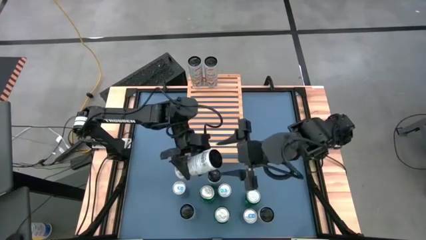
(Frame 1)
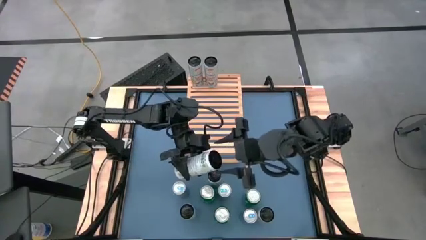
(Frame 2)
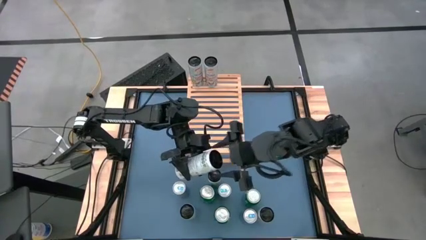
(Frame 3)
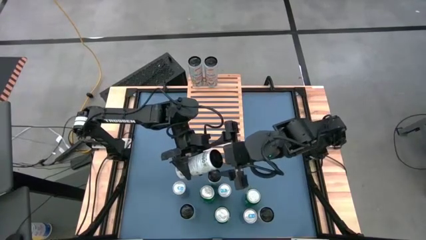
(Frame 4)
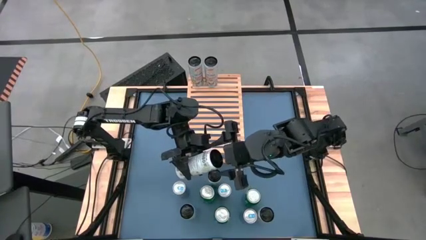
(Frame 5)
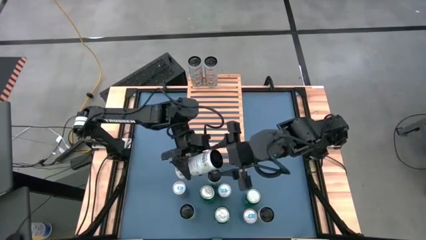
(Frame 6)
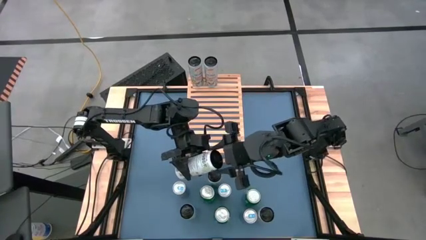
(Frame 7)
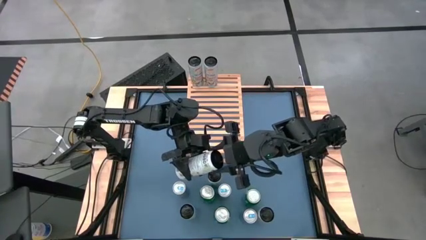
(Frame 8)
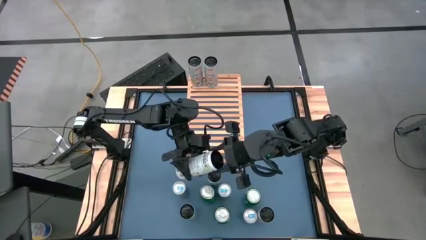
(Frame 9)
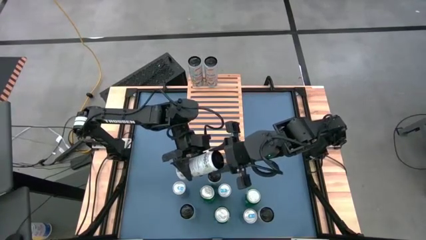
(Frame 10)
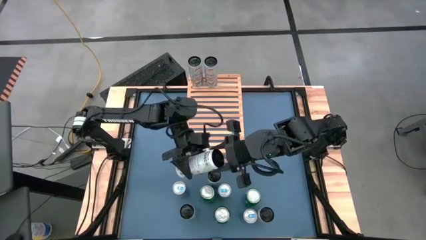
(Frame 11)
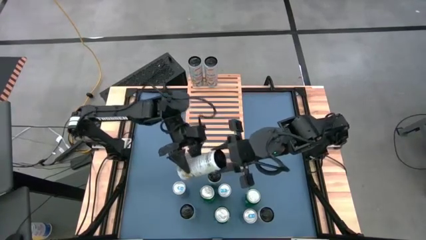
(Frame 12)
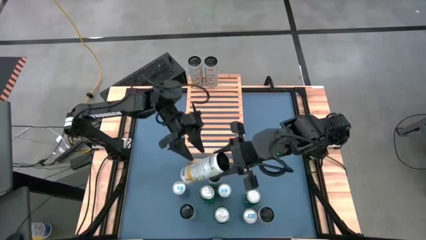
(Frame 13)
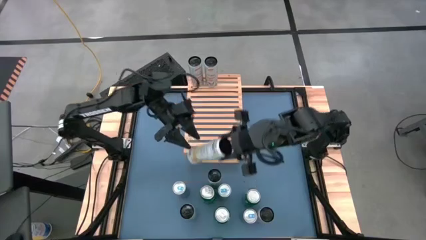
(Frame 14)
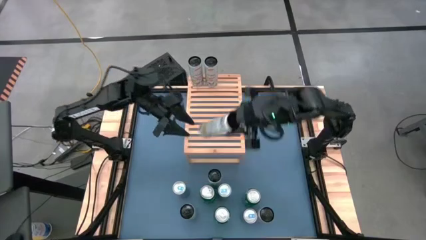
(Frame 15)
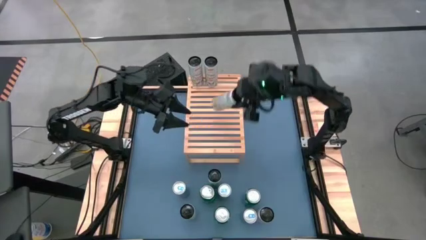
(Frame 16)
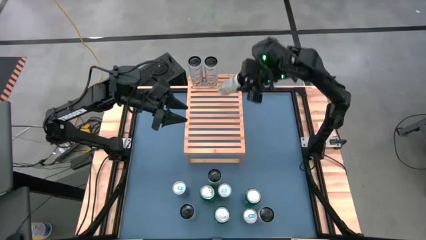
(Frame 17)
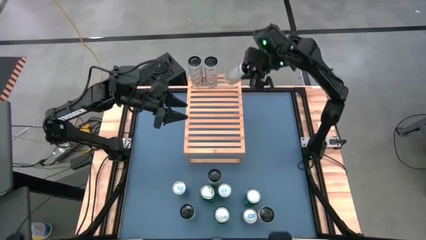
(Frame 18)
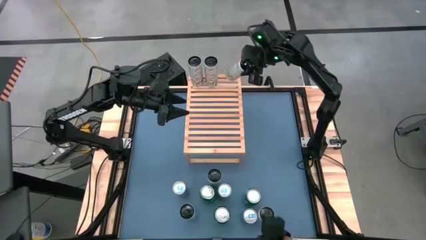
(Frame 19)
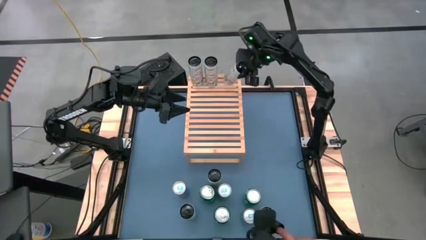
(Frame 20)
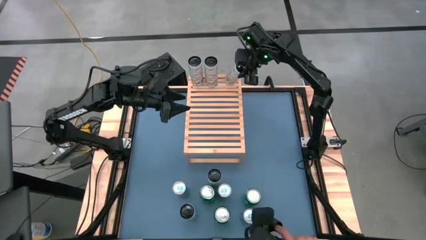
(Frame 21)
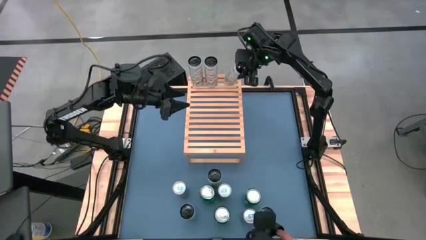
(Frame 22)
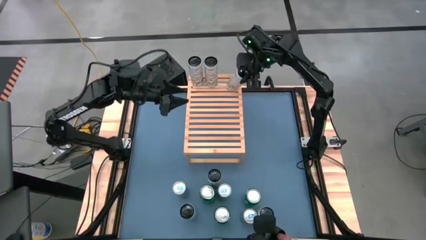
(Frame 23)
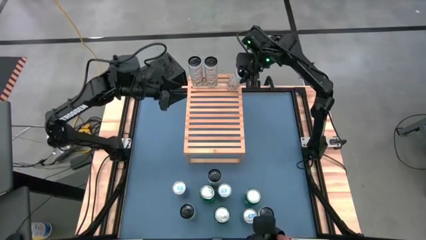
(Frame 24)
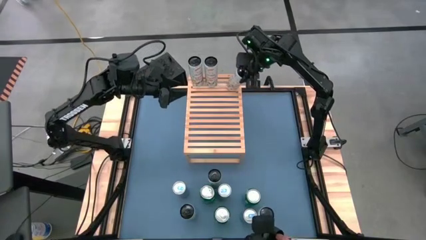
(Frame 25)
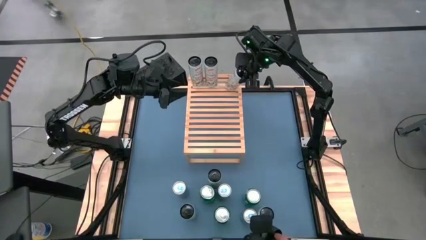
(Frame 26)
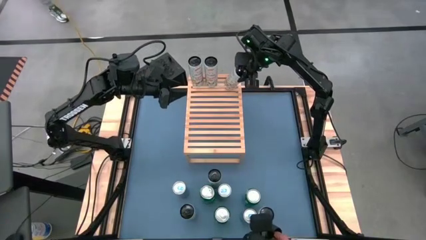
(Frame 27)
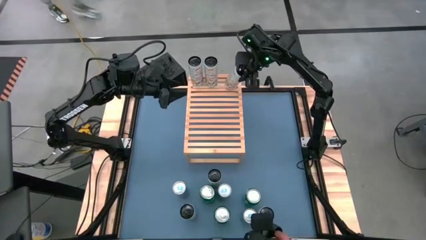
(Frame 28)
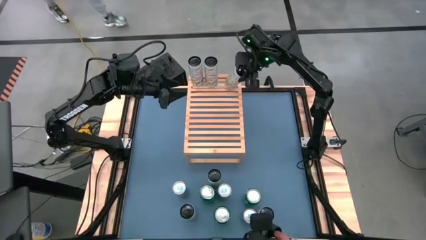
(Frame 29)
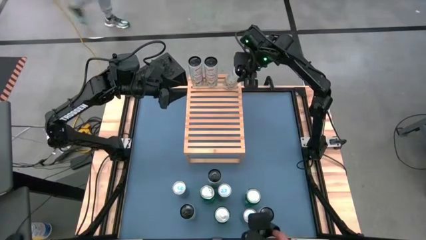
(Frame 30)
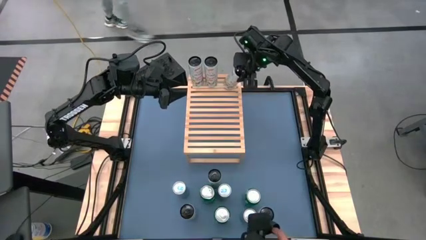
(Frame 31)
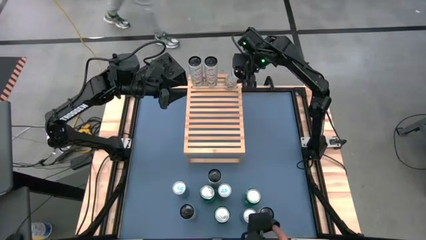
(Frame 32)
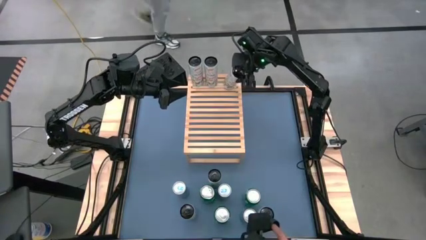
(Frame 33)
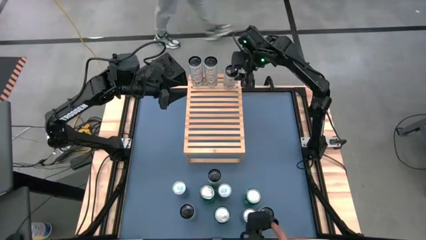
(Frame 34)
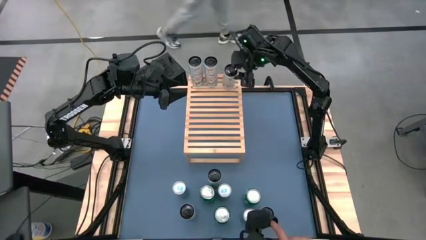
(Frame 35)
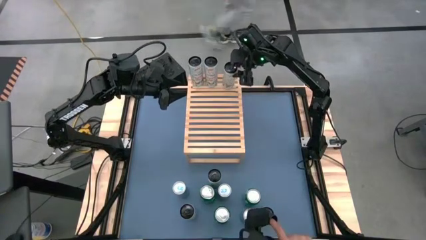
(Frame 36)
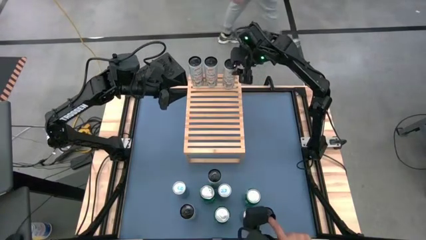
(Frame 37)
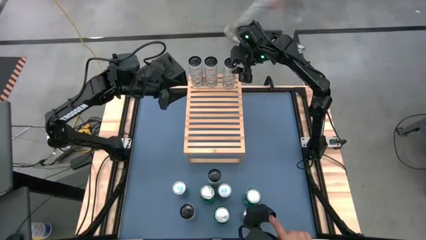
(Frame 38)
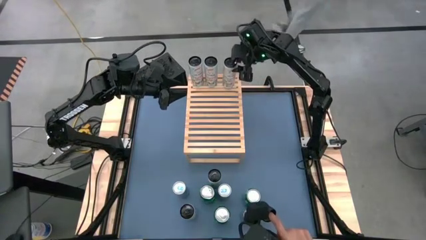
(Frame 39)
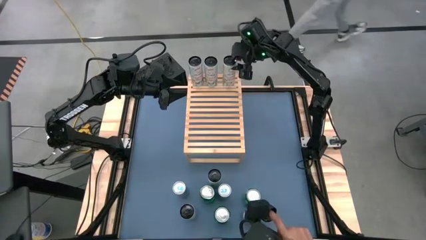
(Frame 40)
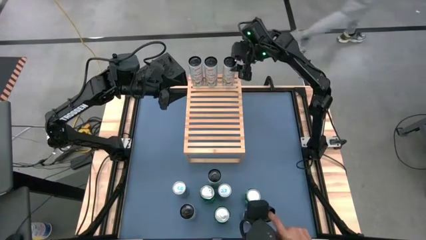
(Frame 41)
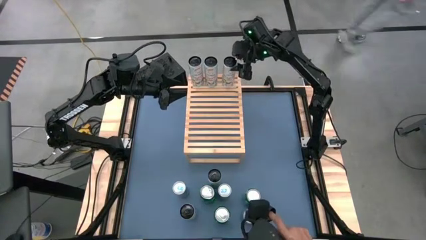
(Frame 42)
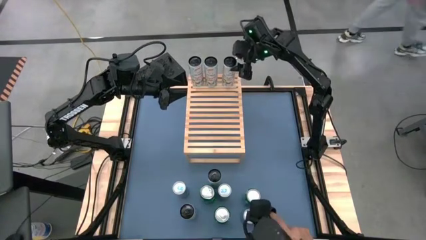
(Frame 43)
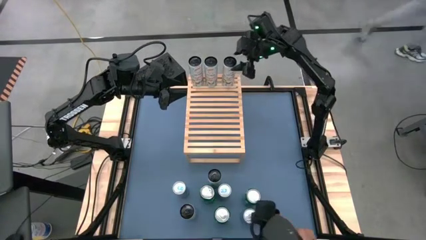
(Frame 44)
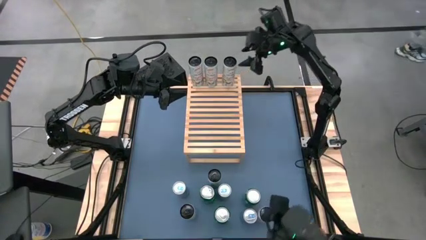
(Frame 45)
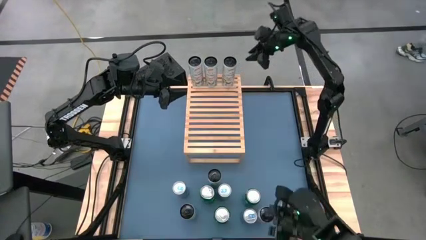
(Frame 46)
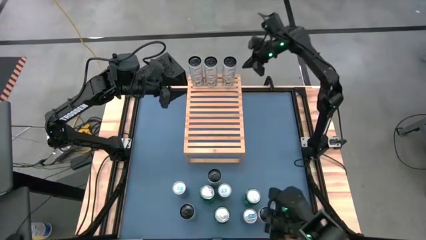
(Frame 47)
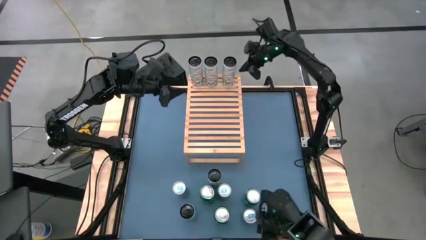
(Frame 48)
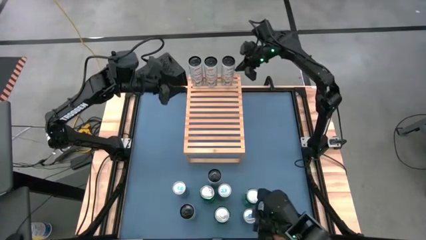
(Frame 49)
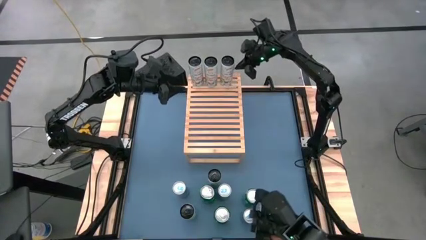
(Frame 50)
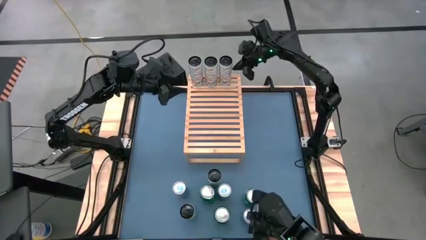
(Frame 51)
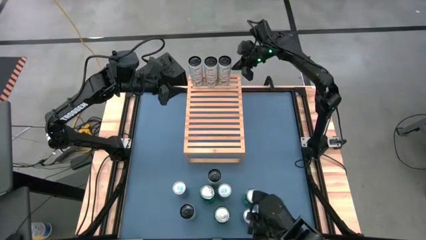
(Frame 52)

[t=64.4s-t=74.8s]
Task: Place canned beverage on shelf
Put the white yellow soda can on the shelf aligned with the other white yellow soda can
